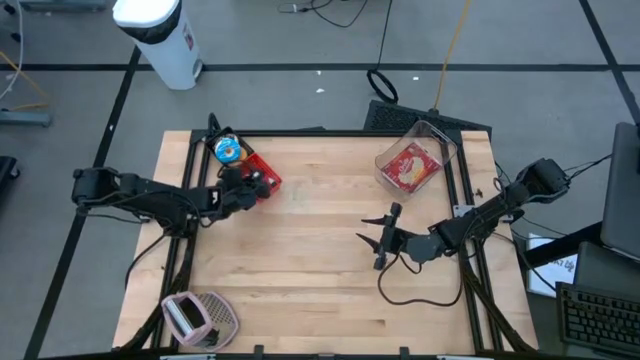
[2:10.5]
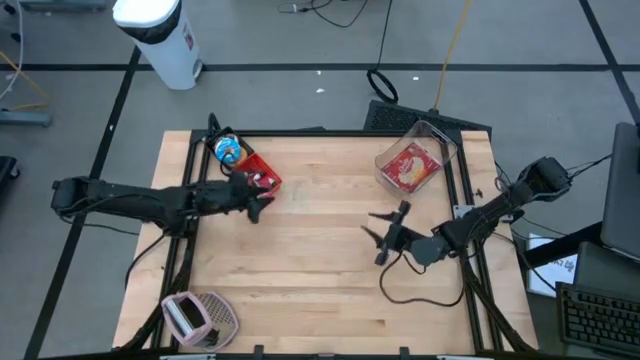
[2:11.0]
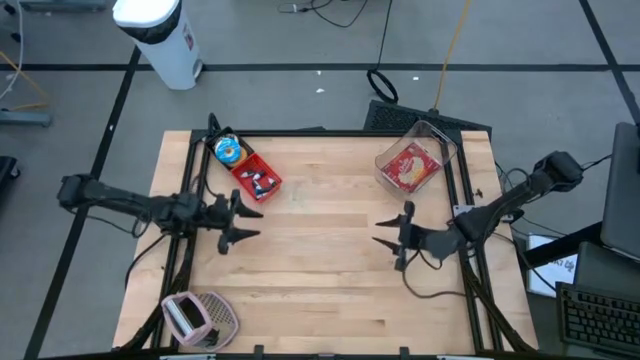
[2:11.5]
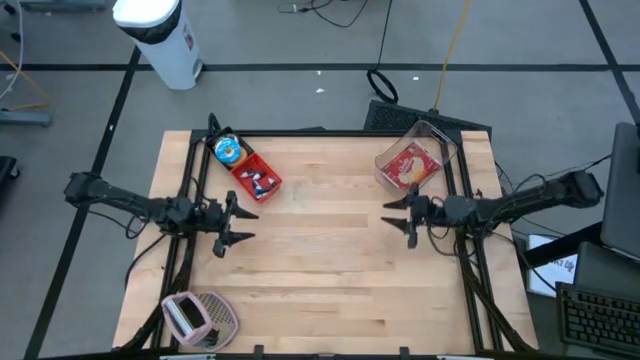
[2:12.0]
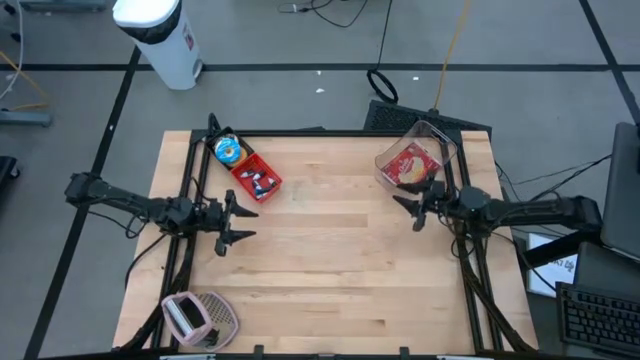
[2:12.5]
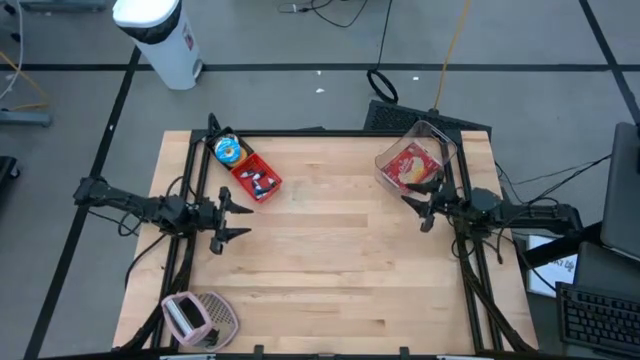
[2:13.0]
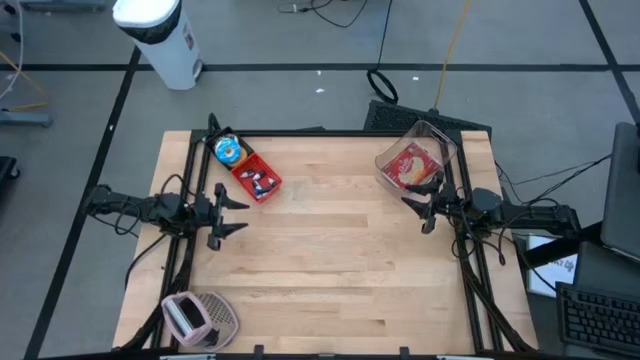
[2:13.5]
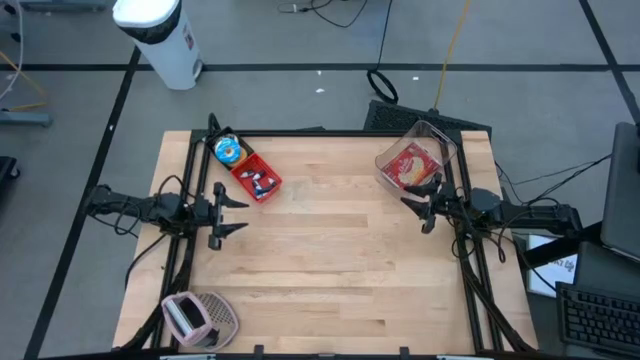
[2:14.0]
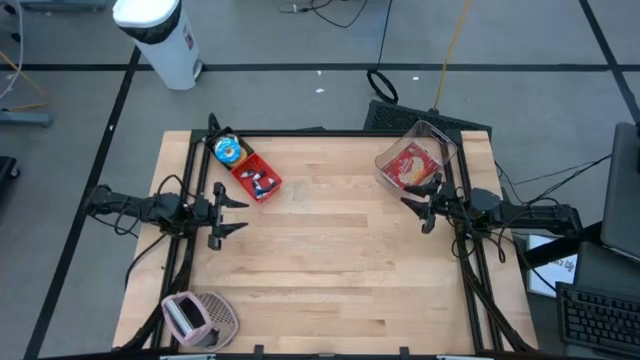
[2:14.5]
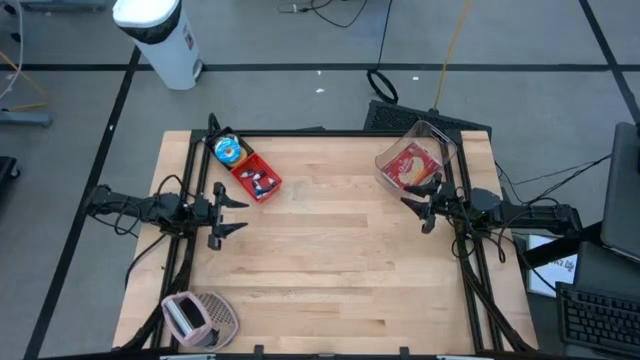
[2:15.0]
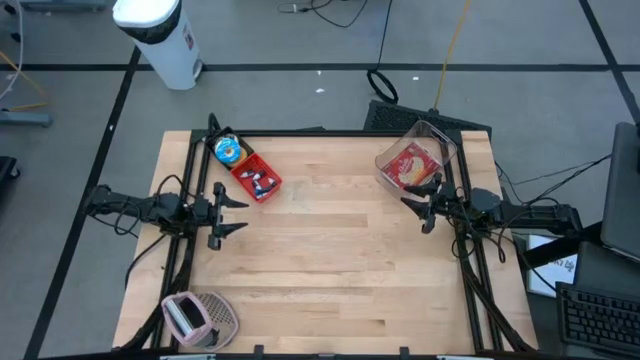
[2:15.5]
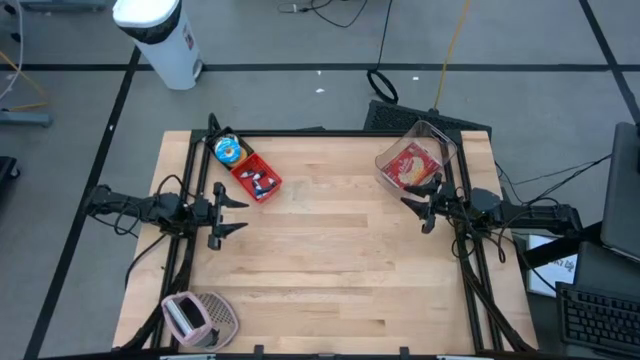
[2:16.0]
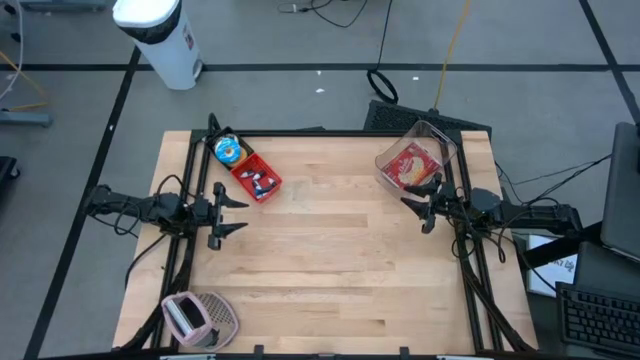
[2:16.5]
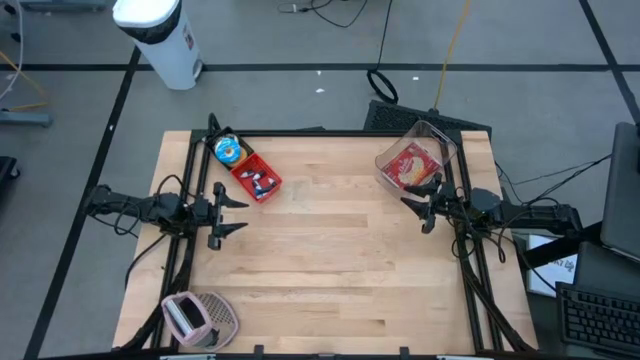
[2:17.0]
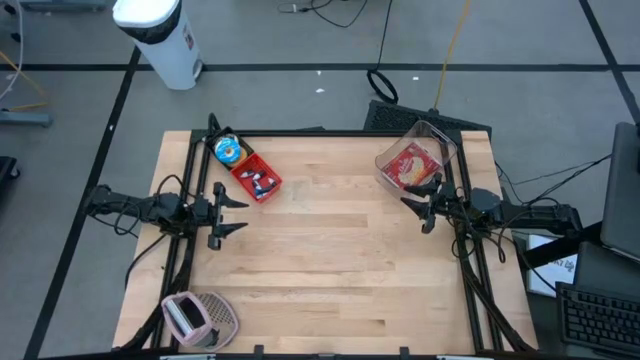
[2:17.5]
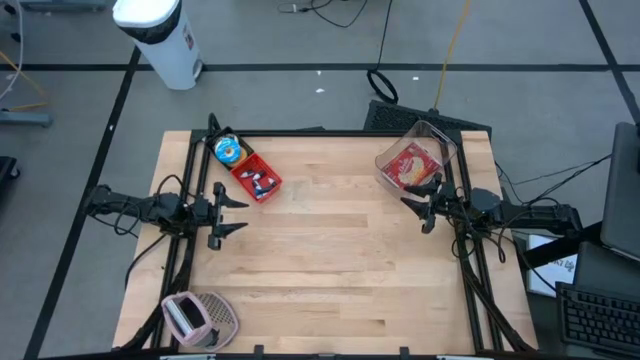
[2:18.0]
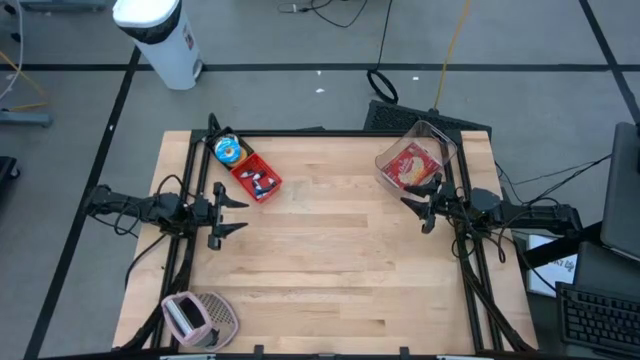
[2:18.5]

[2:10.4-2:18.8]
Return to Home Position

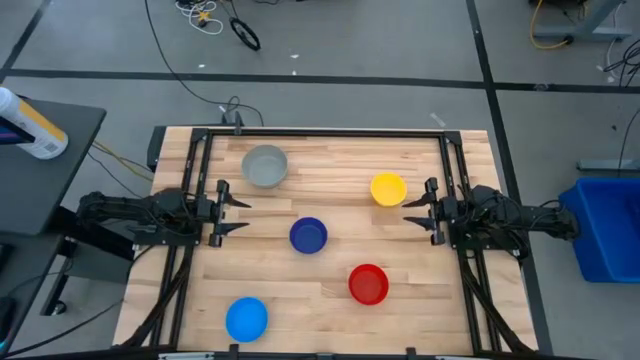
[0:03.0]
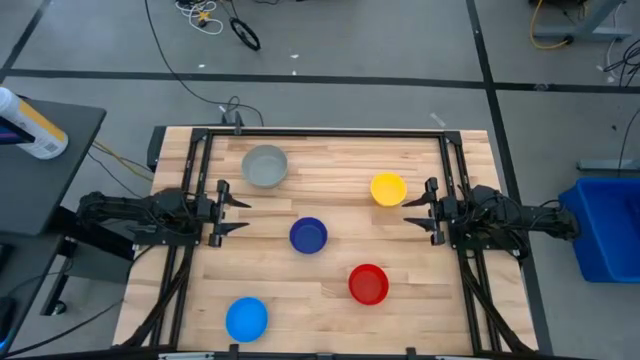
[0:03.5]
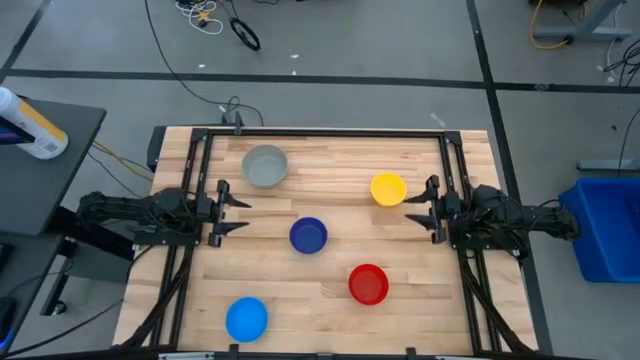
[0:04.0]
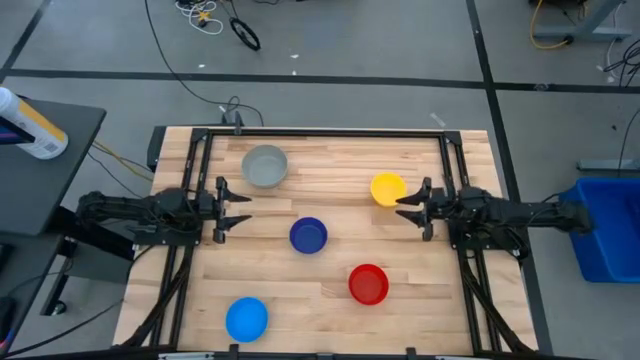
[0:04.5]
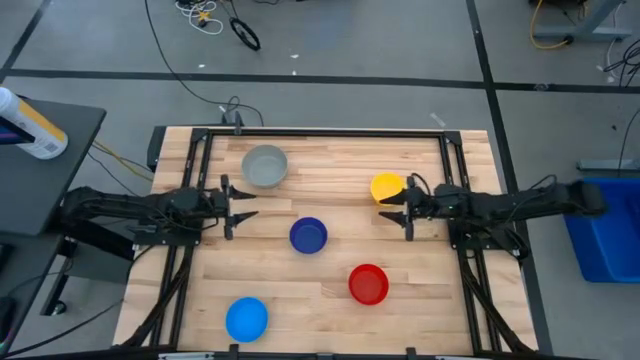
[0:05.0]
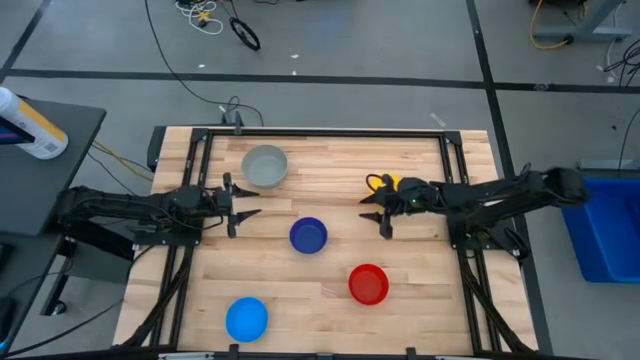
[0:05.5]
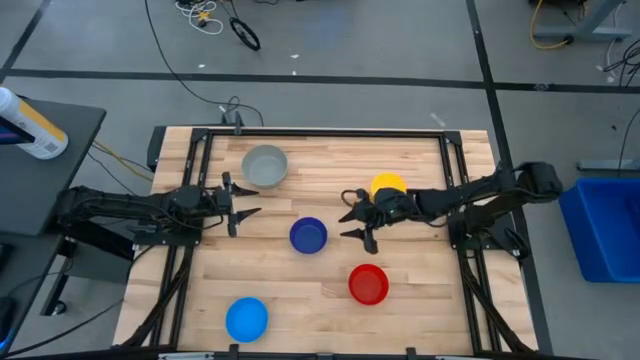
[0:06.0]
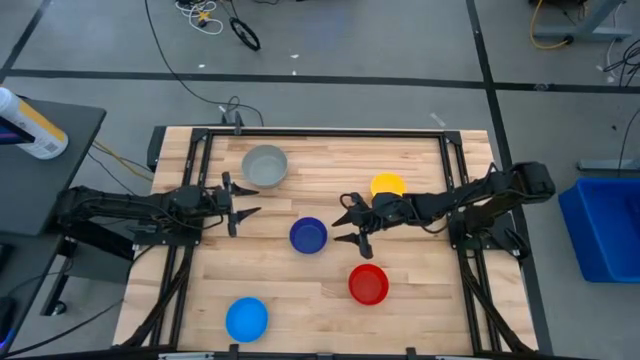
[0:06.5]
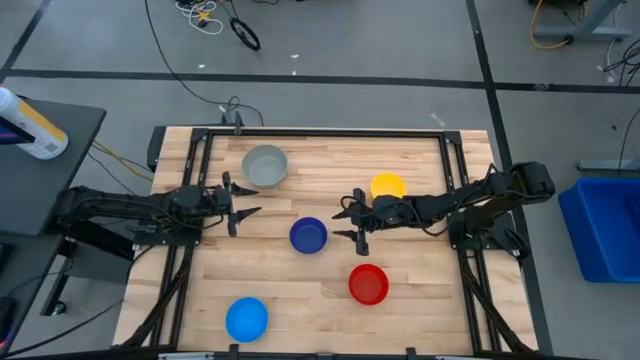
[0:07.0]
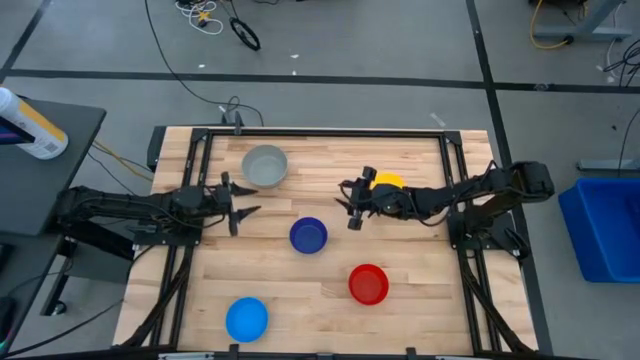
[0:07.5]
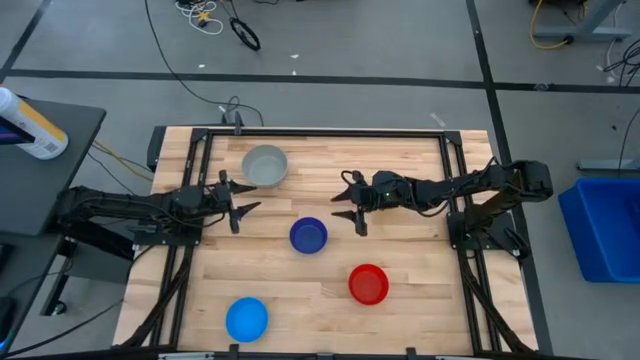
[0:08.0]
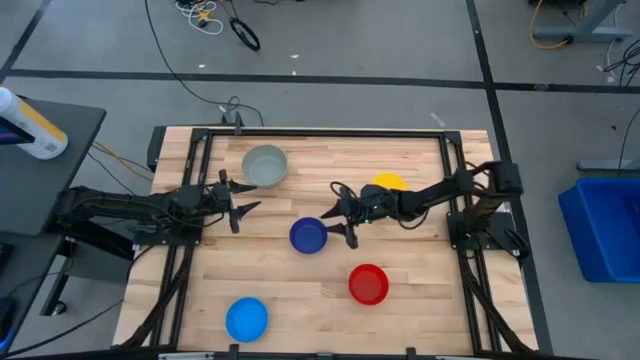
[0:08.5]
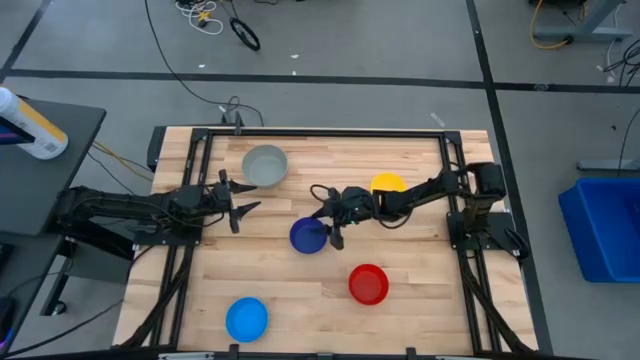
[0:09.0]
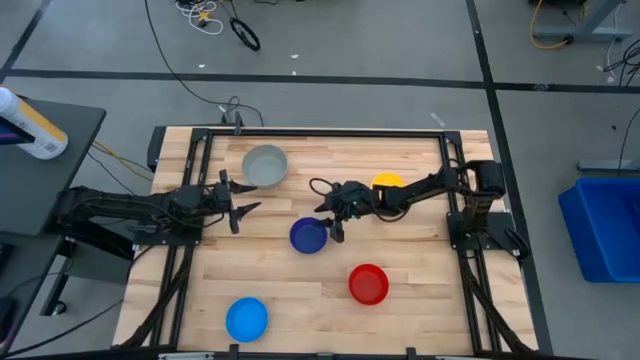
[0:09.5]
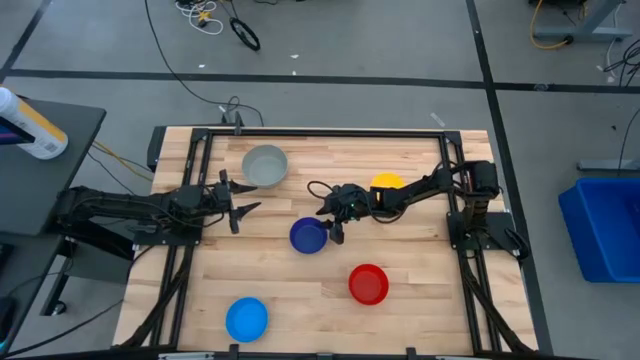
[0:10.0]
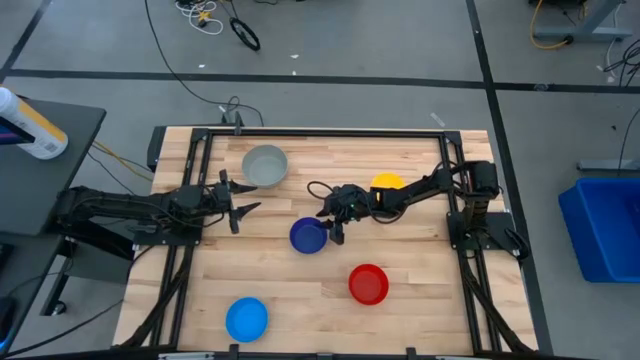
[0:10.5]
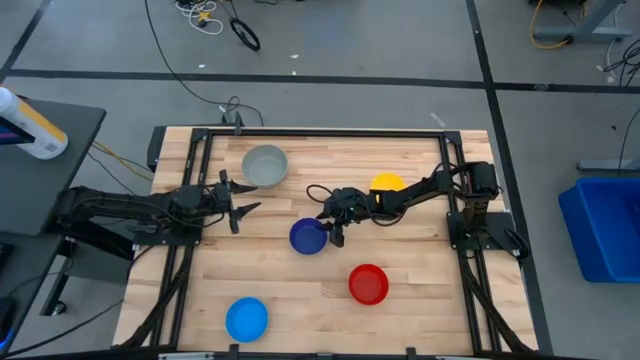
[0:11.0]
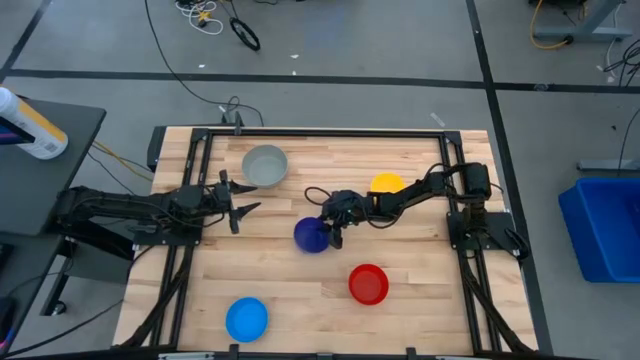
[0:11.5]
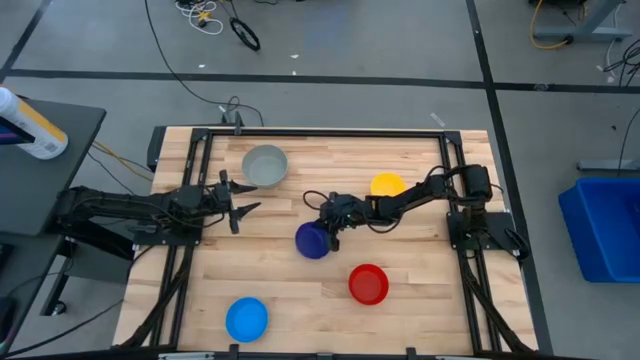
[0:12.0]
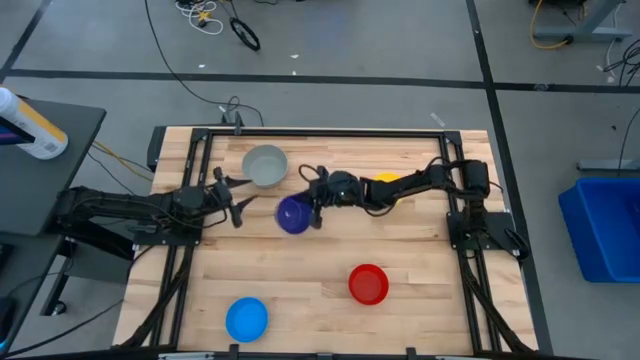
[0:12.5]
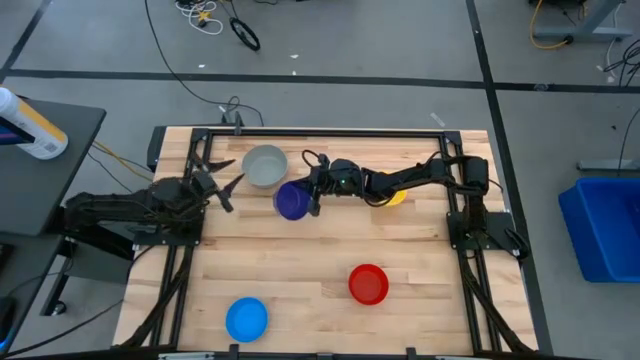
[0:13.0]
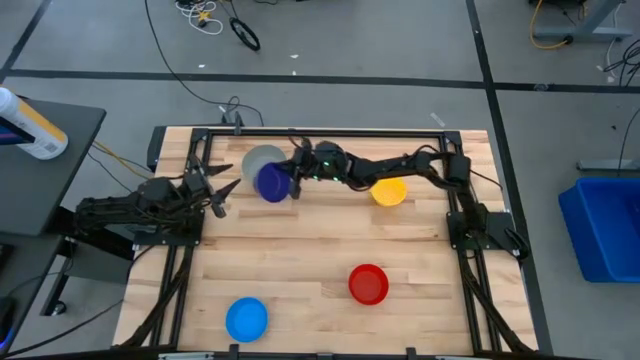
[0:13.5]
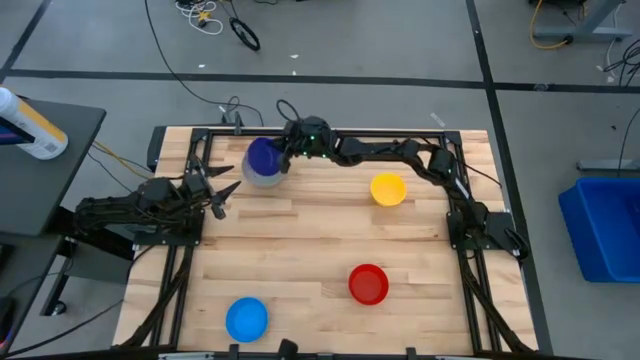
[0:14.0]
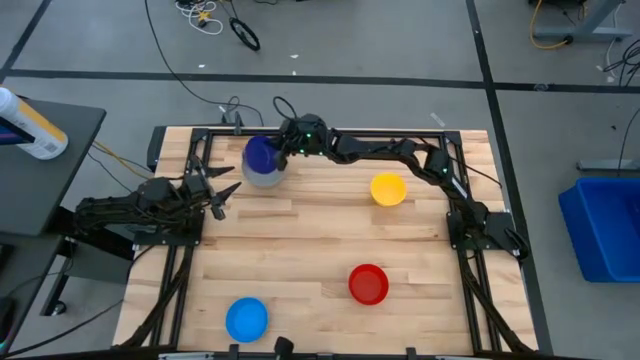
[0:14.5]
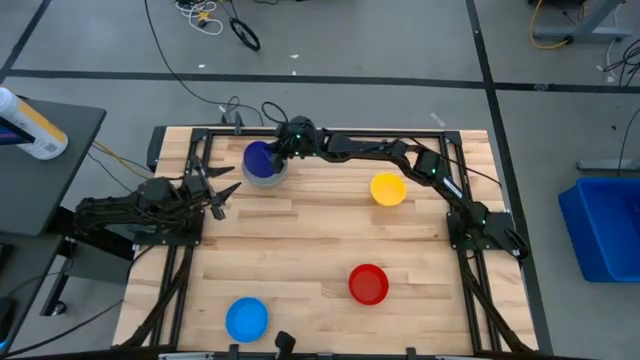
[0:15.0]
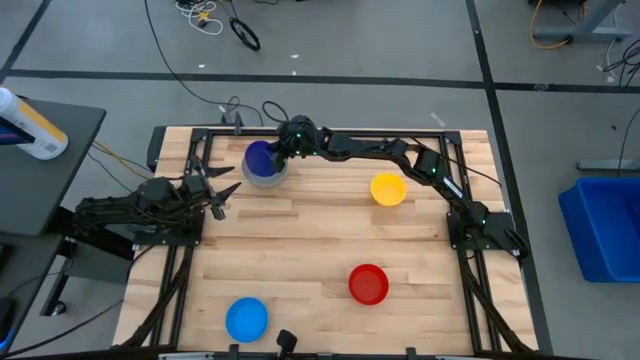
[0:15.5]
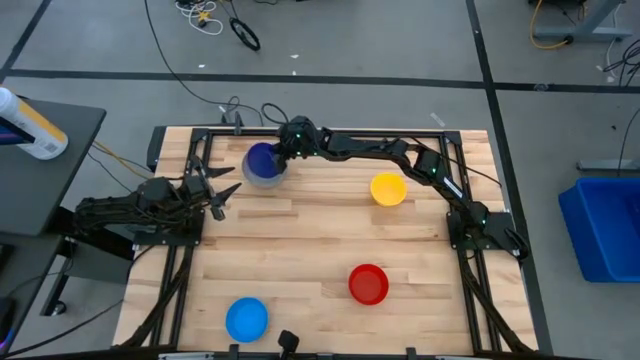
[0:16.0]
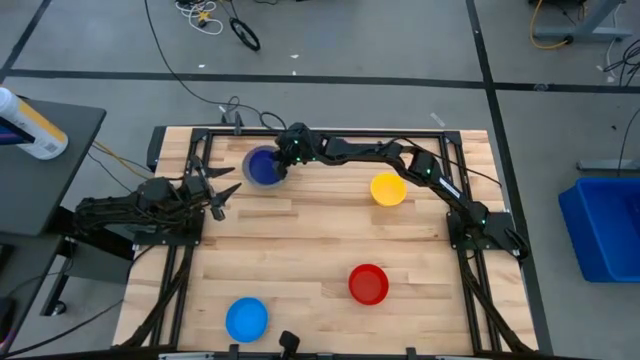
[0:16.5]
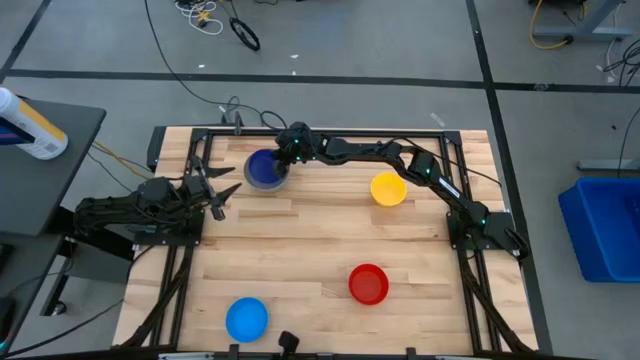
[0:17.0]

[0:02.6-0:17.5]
Stack the blue bowl on the gray bowl
